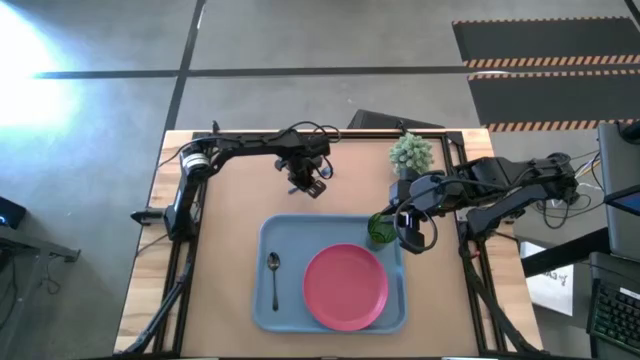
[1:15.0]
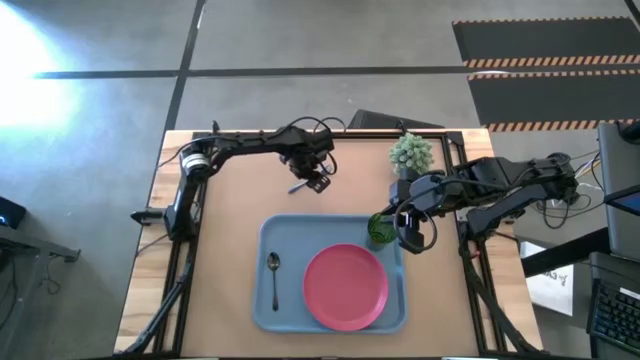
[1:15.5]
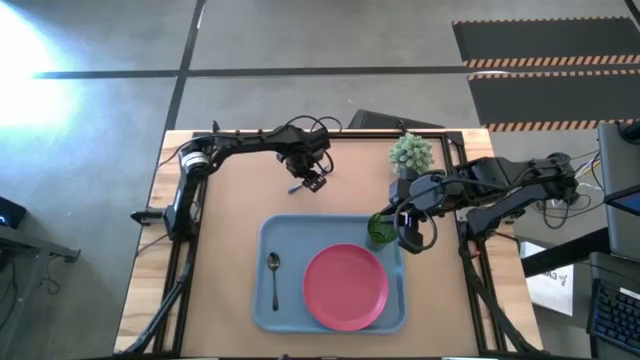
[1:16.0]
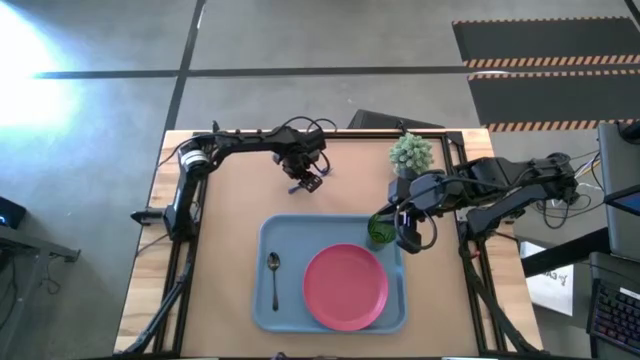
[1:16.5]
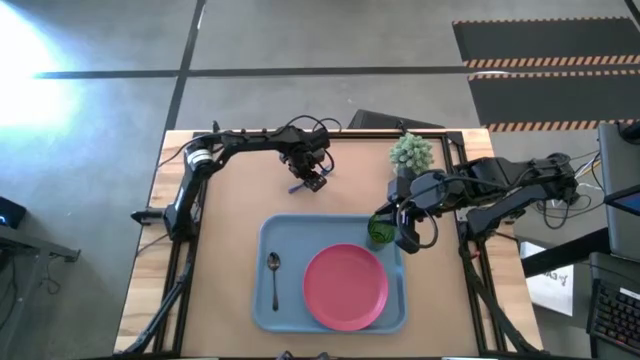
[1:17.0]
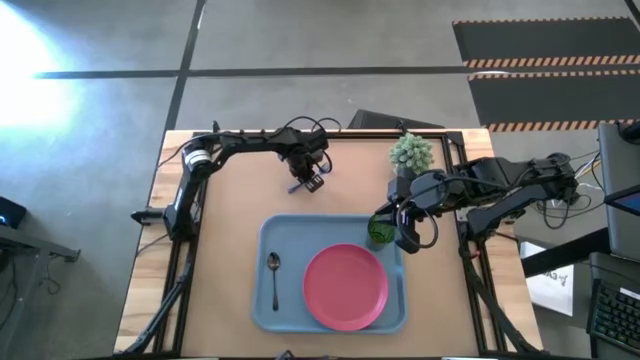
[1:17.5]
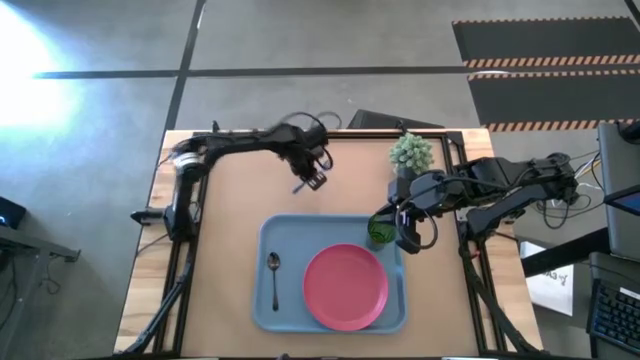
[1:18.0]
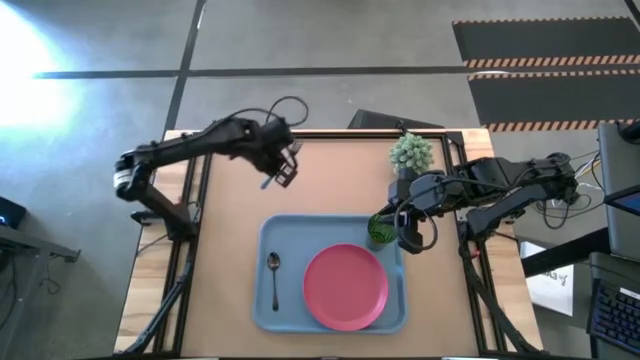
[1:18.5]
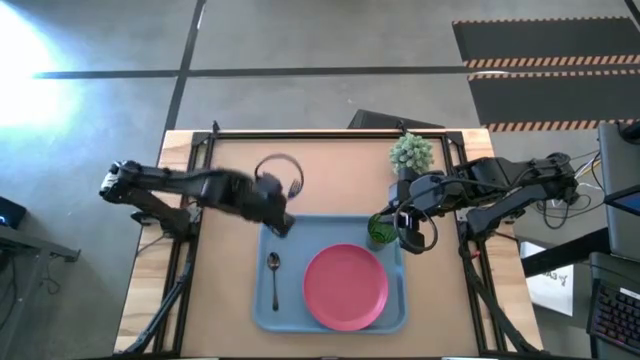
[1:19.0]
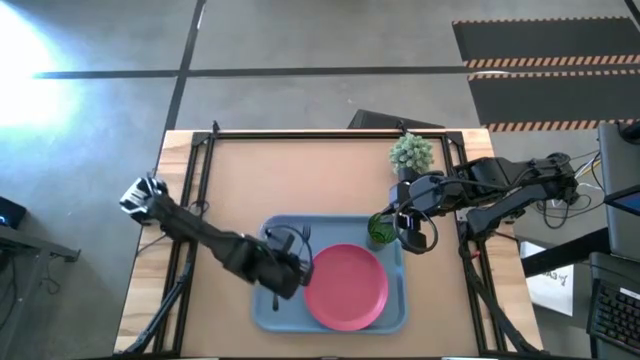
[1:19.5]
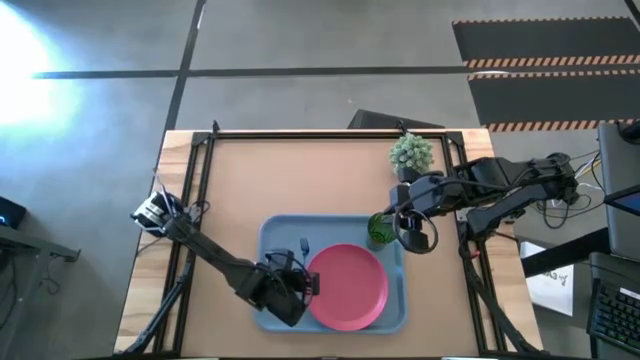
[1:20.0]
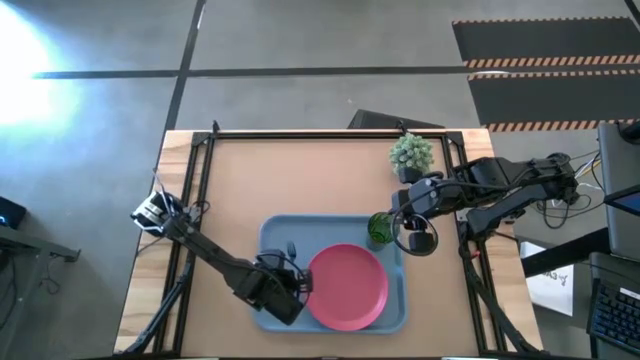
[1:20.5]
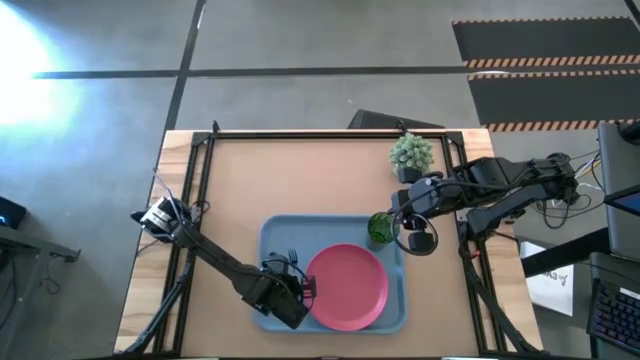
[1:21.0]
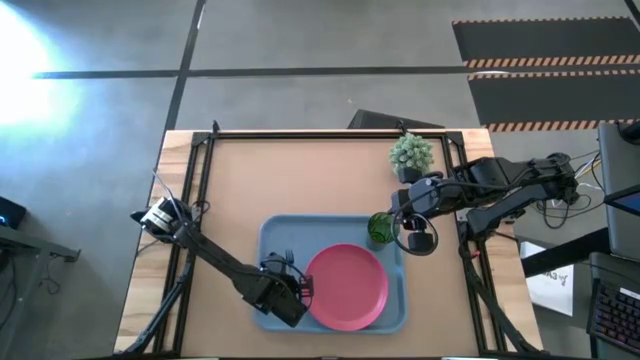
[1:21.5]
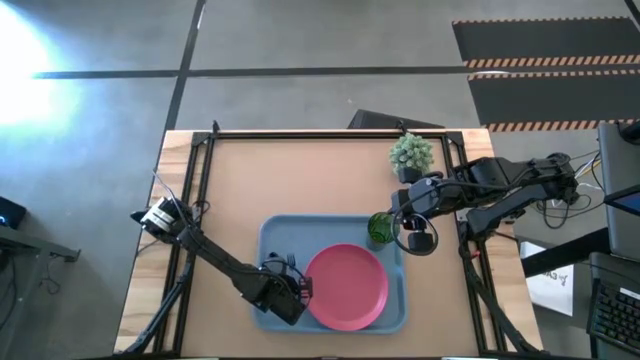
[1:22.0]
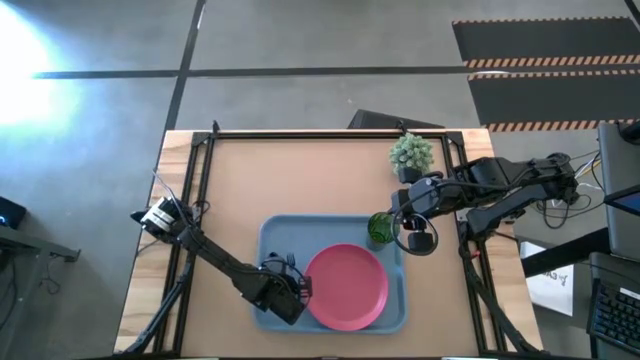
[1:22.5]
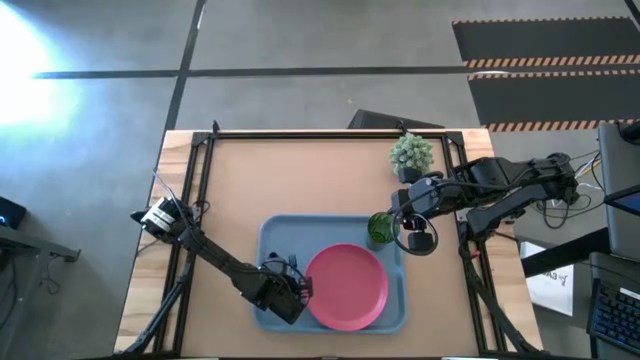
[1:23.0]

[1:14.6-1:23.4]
Task: Pick and place plate/cup/fork/spoon on tray
Put the blue fork on the blue tray to the left of the pink plate

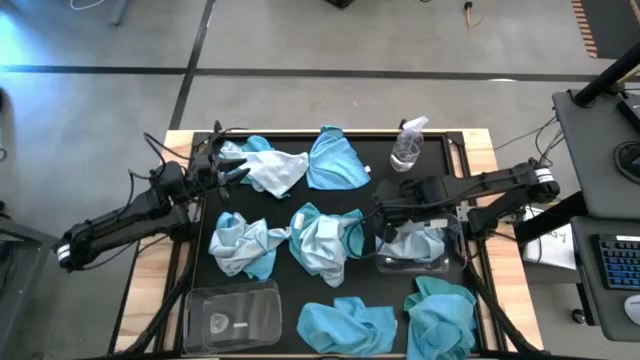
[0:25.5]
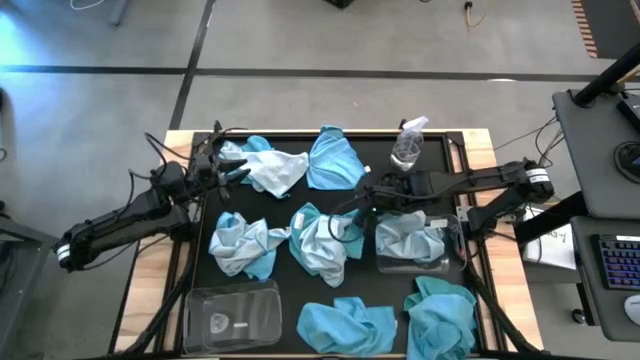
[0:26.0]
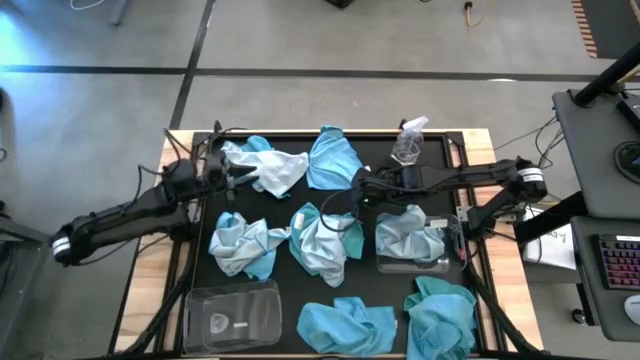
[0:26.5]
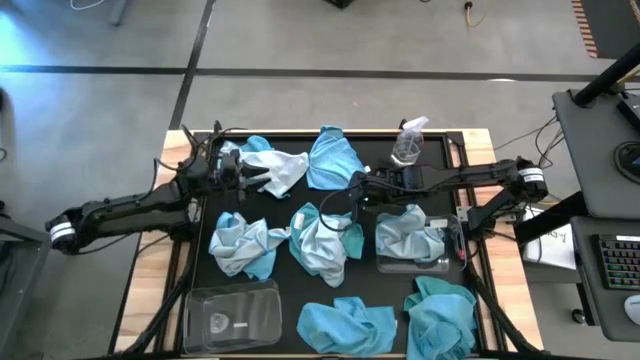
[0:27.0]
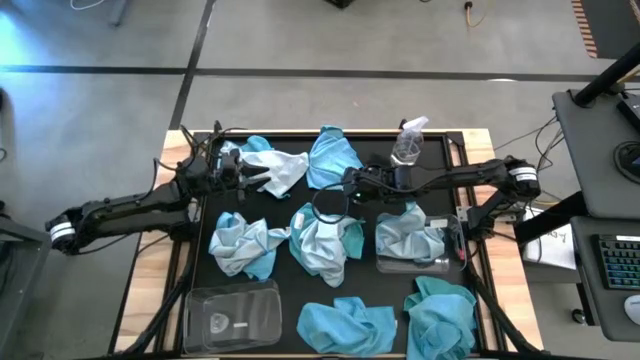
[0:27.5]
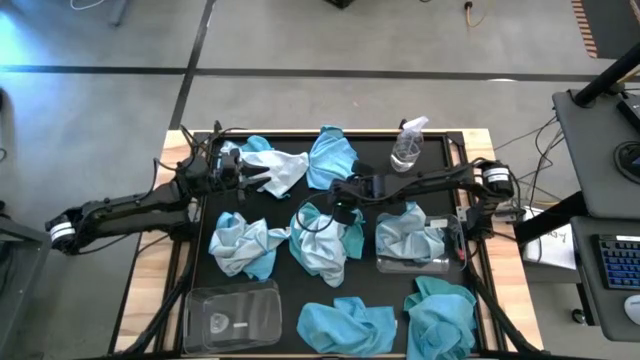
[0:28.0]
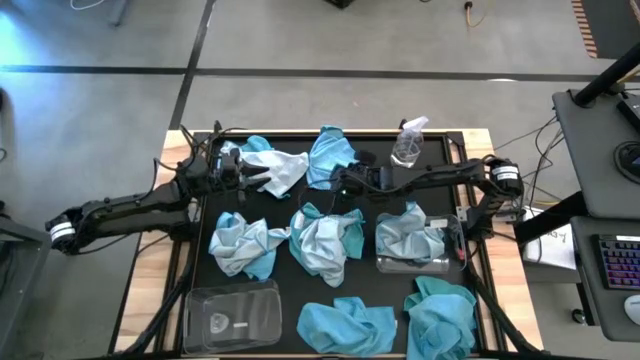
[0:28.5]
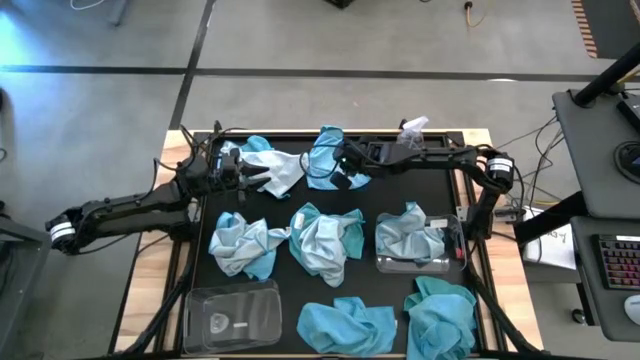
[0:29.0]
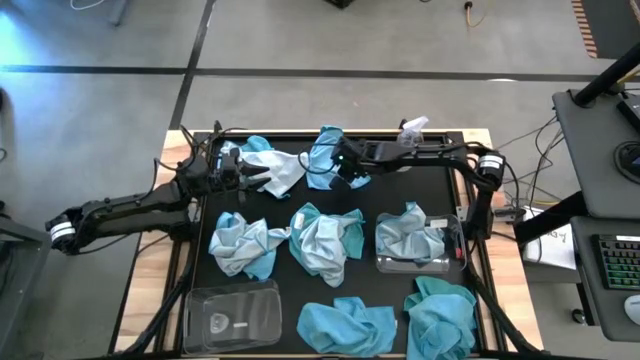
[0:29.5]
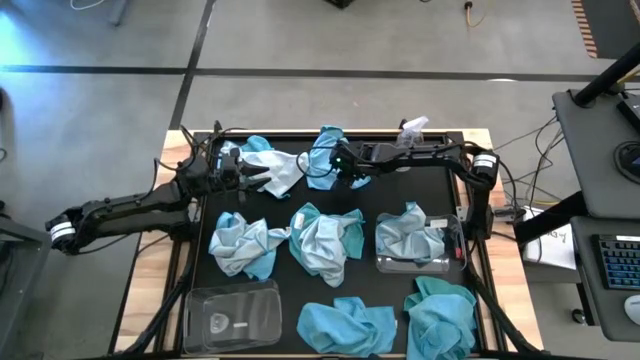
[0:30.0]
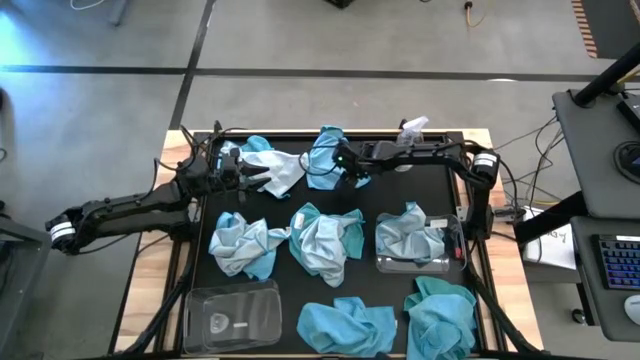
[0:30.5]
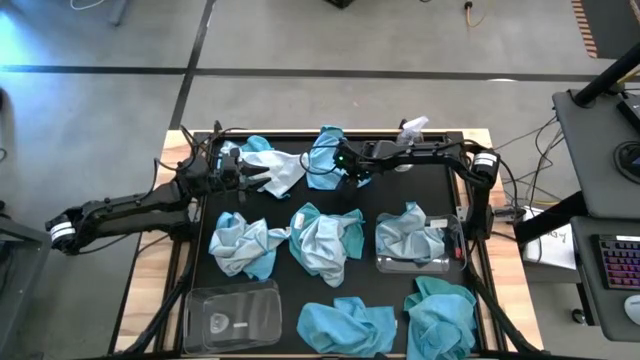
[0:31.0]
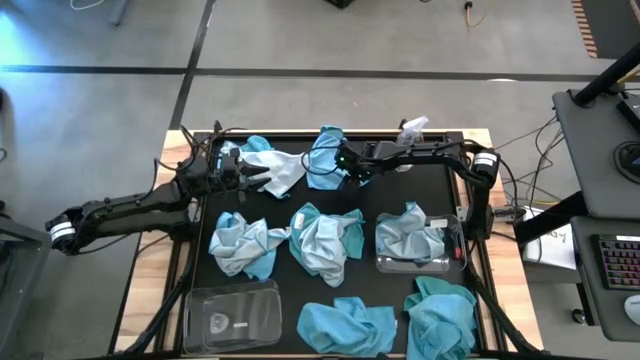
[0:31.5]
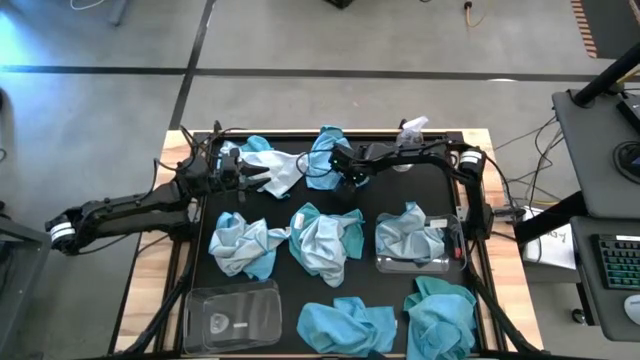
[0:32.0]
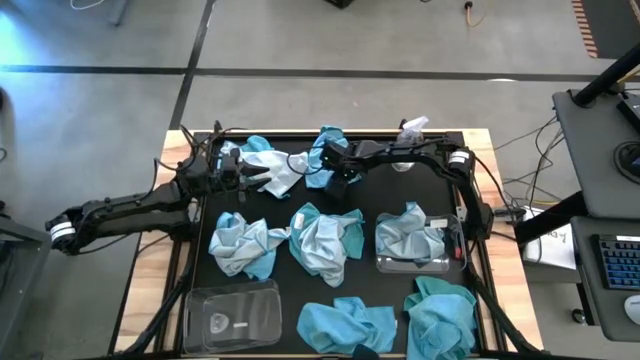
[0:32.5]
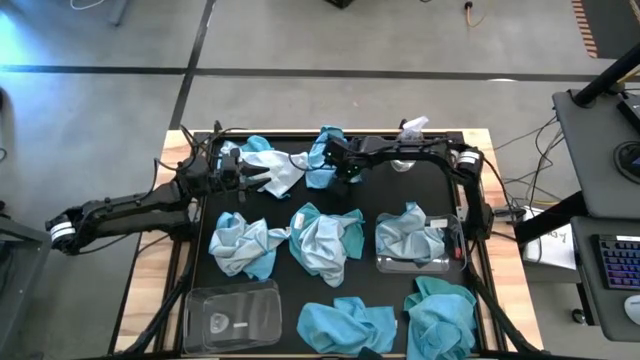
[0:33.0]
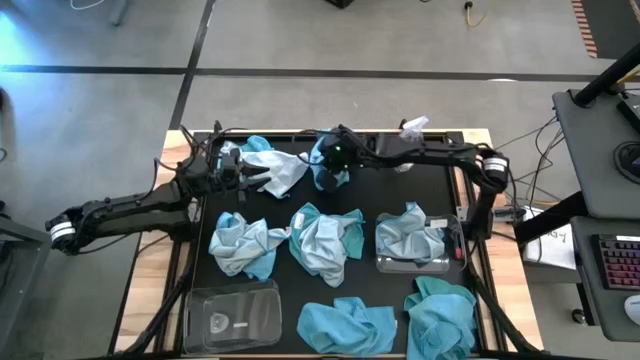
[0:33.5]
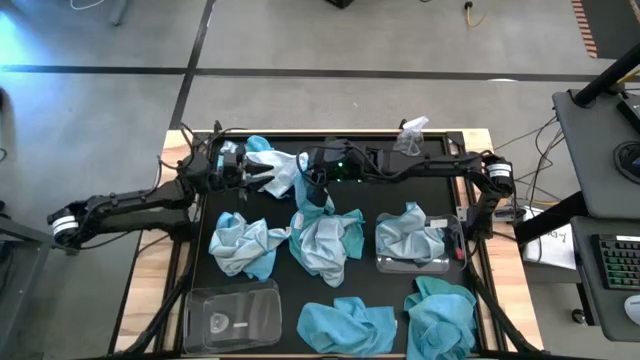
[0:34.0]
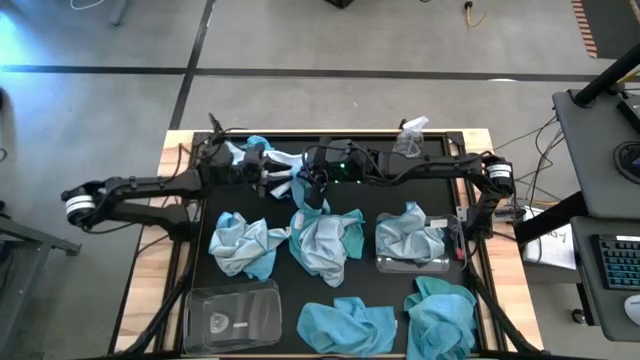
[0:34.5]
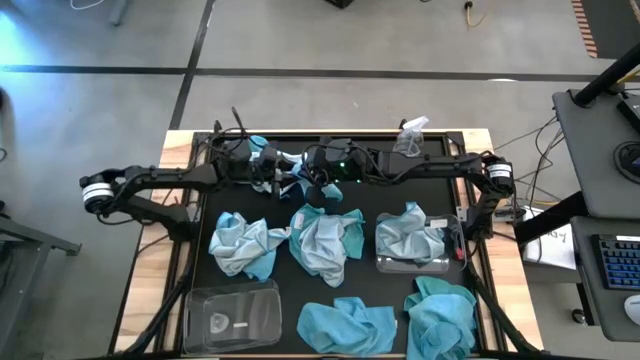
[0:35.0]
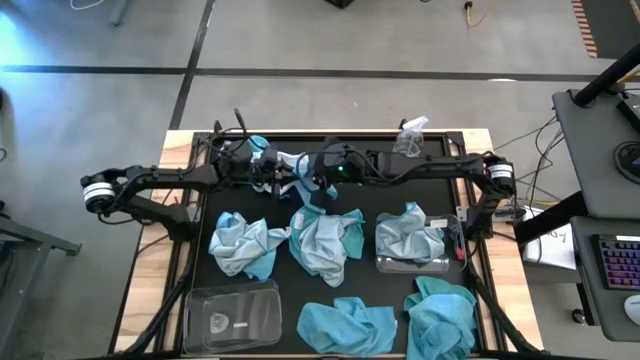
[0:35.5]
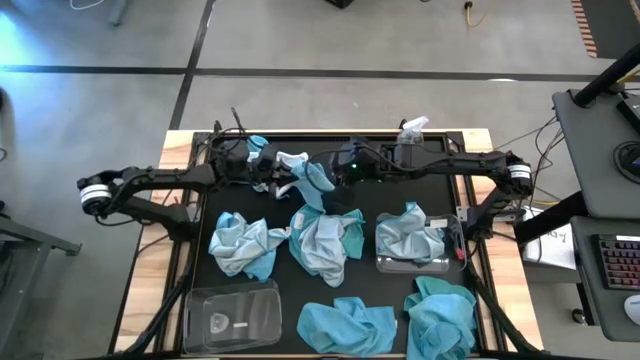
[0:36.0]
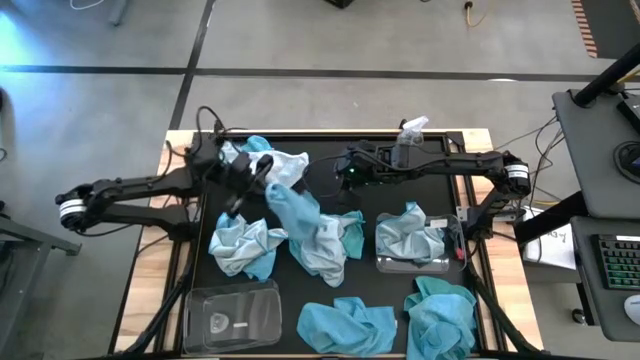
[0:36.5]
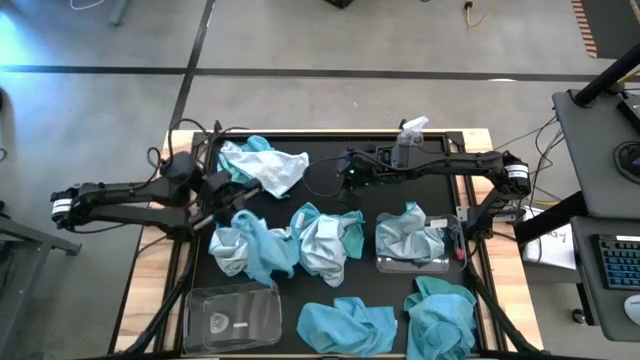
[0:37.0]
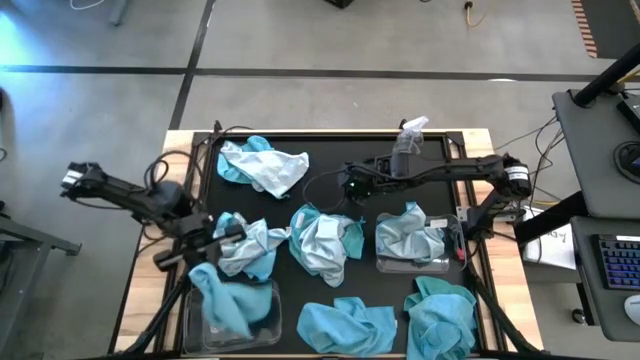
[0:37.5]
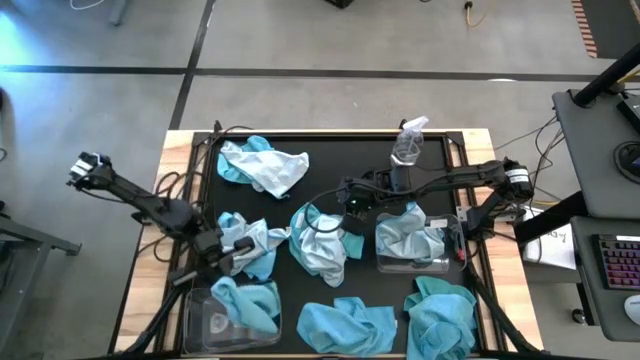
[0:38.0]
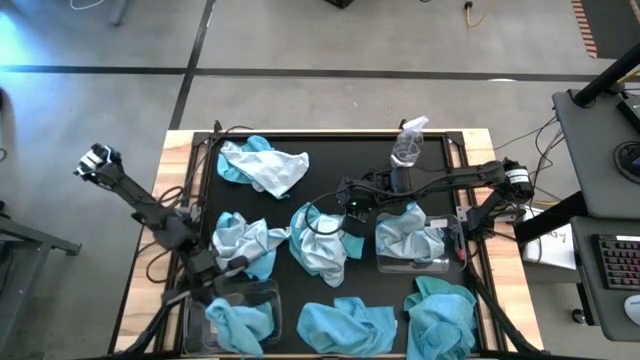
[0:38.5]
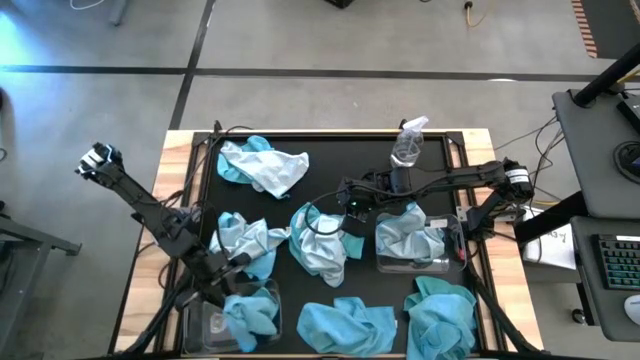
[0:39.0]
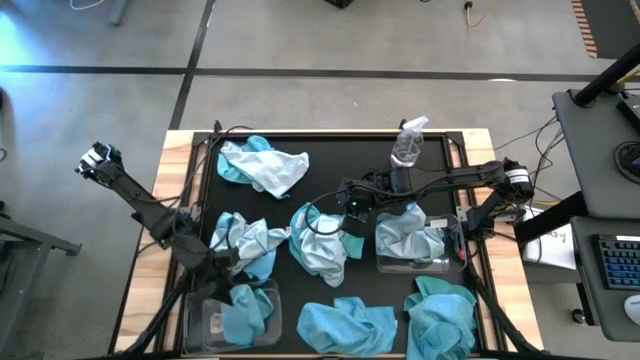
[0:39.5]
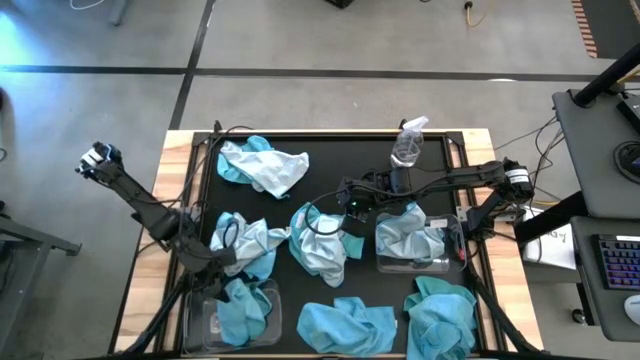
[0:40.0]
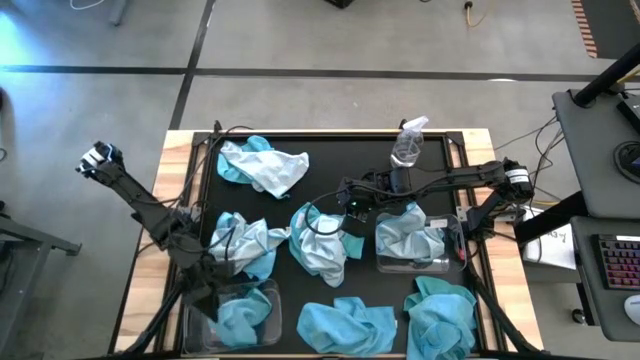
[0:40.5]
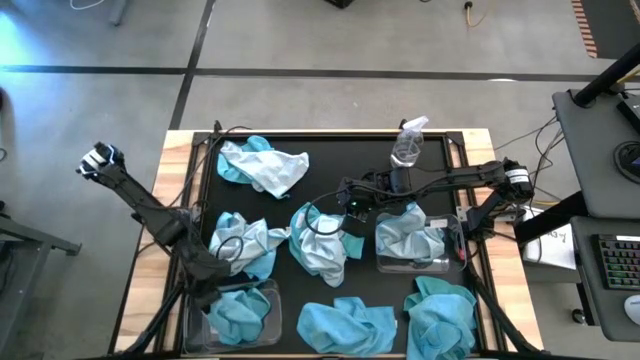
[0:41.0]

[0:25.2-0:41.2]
Task: Sort microfiber towel by color & place in baskets
Put the blue microfiber towel into the left transparent bin
